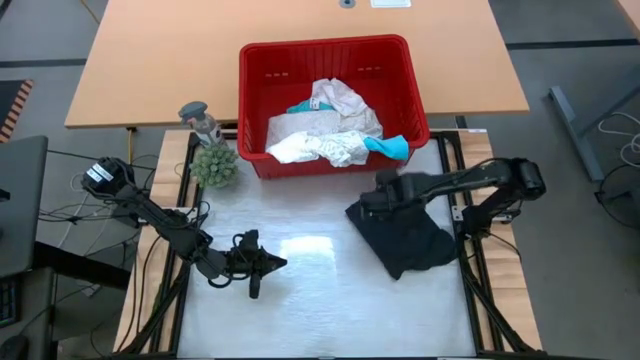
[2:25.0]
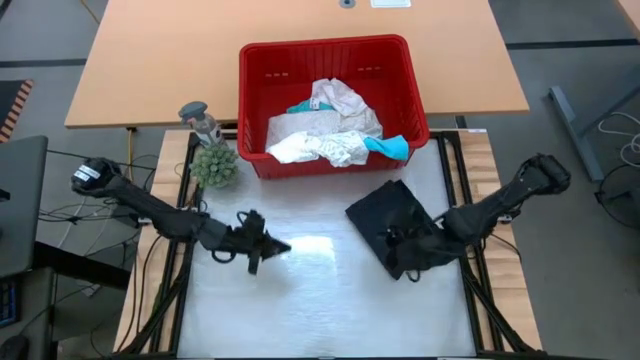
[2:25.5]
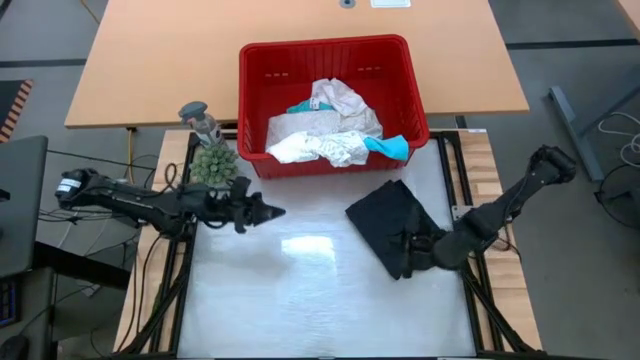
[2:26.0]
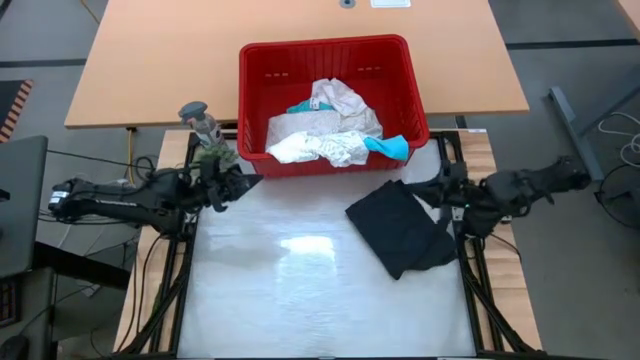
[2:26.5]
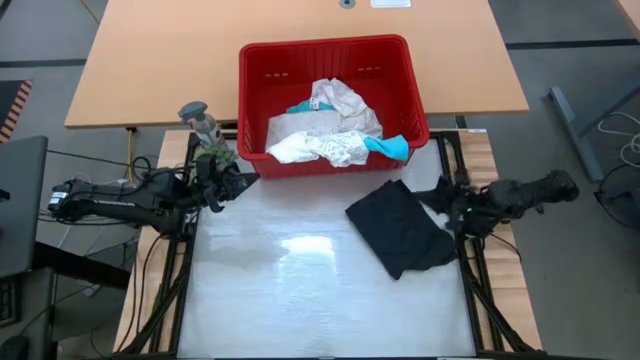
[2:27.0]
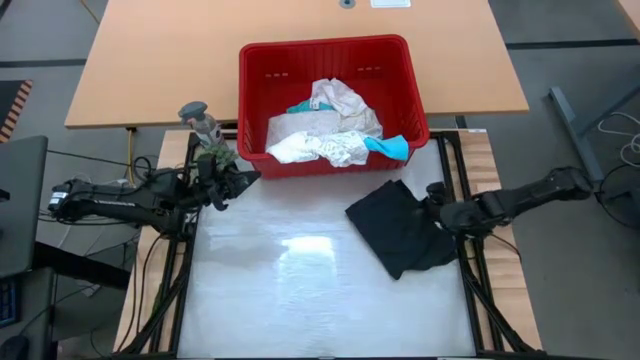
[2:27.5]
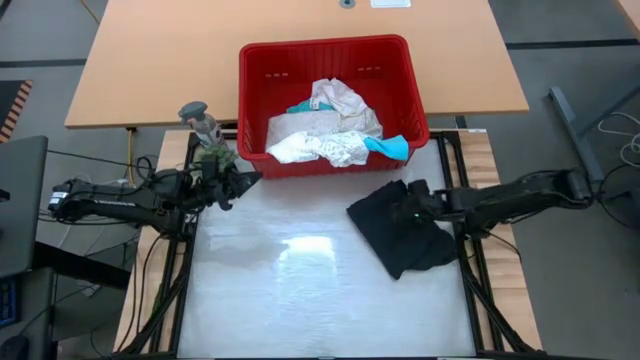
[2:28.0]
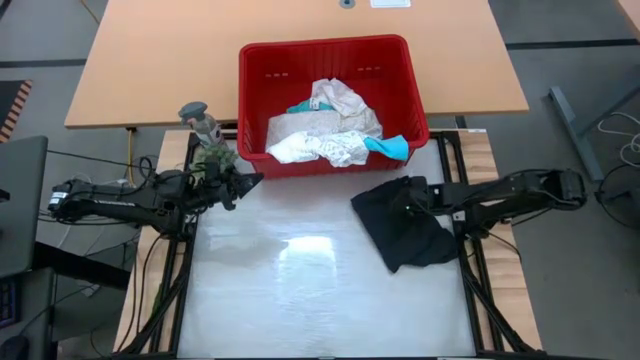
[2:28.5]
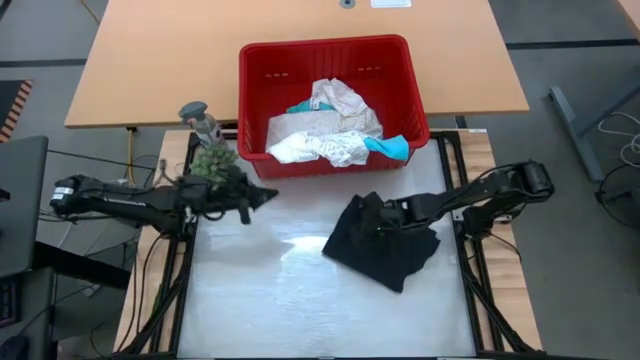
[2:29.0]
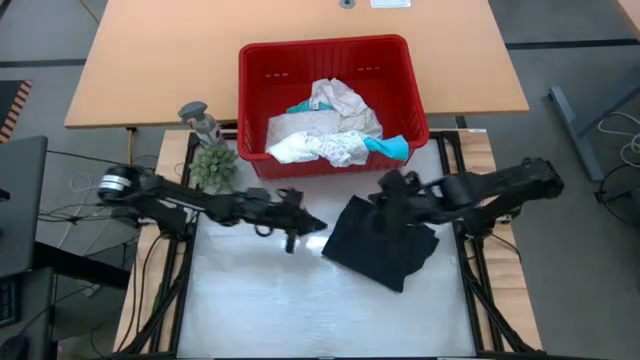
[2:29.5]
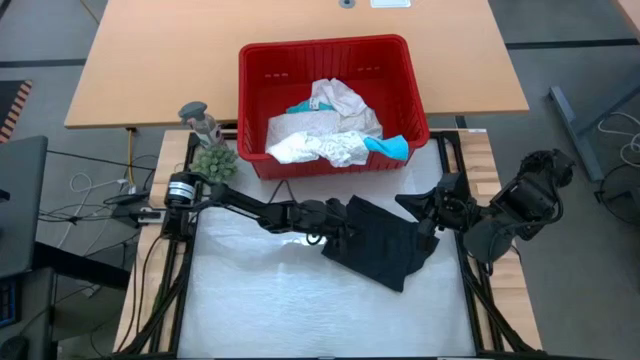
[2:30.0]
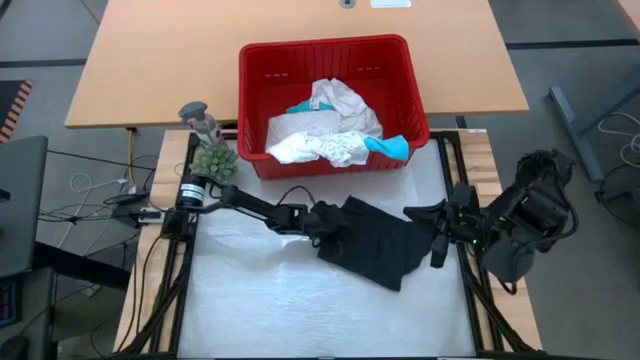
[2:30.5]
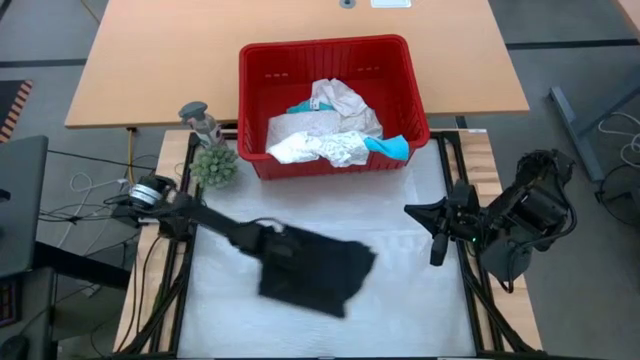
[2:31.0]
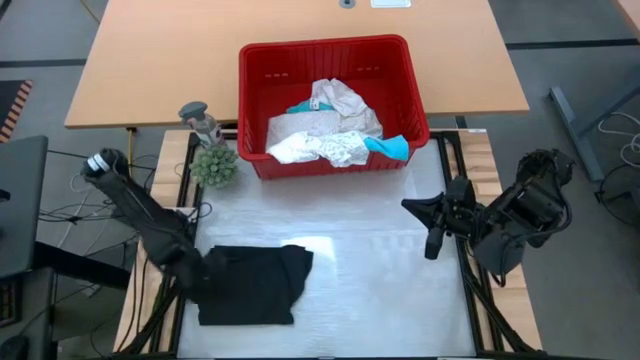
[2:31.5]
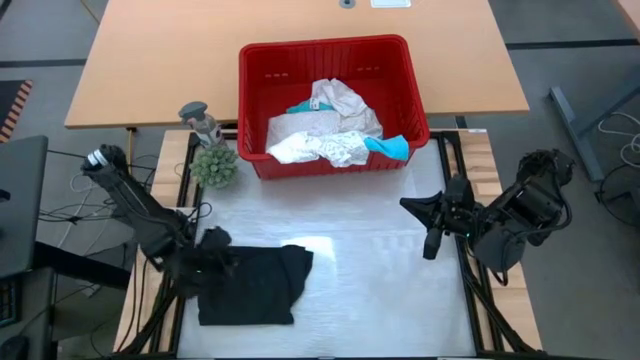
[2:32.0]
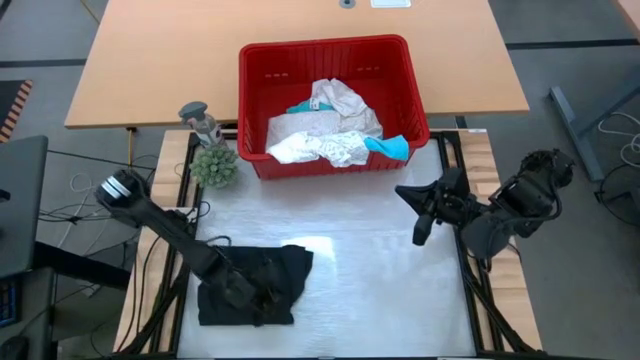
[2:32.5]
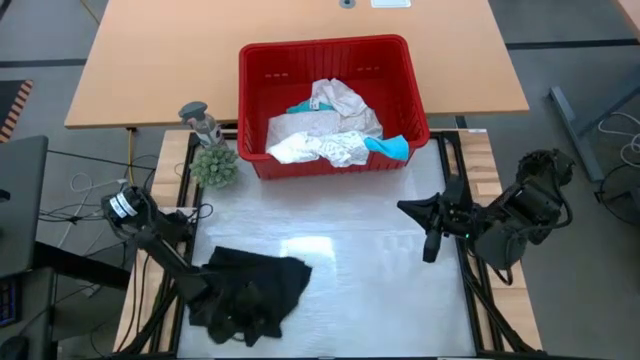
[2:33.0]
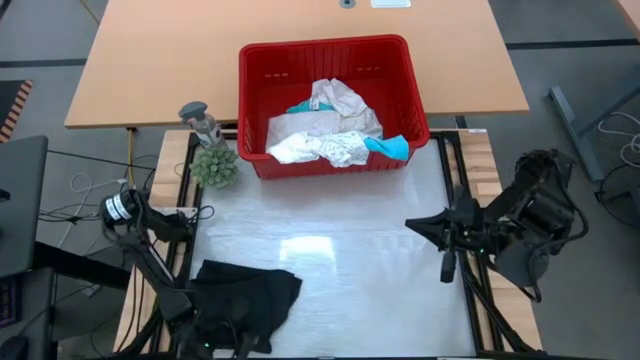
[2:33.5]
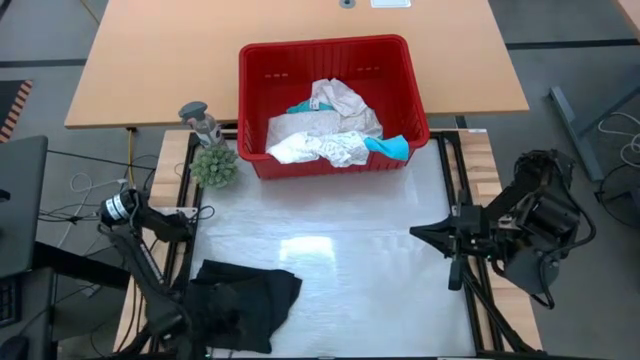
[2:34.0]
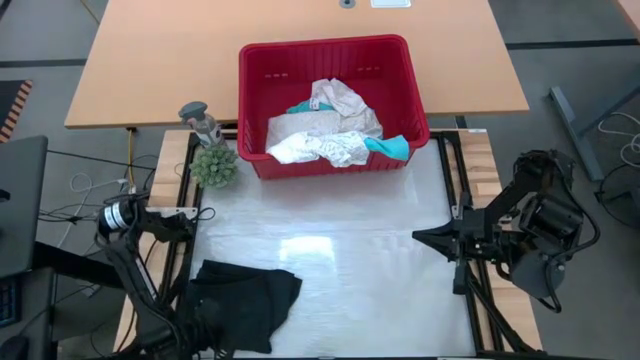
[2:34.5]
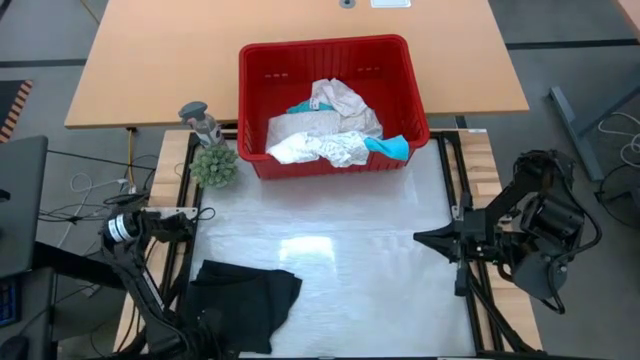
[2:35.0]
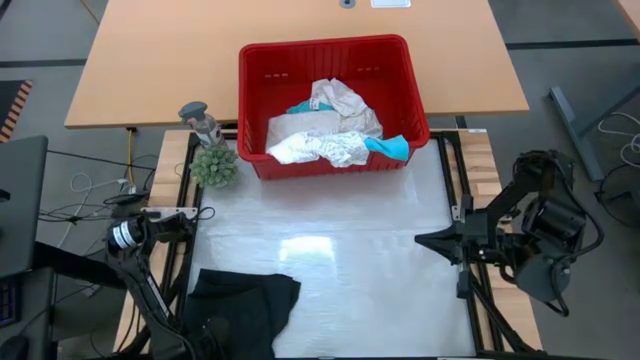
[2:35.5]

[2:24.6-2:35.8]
Task: Fold Laundry from Bin
Move the black shorts to the bottom left of the table

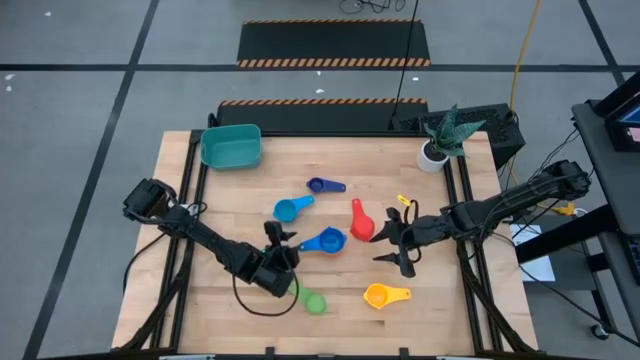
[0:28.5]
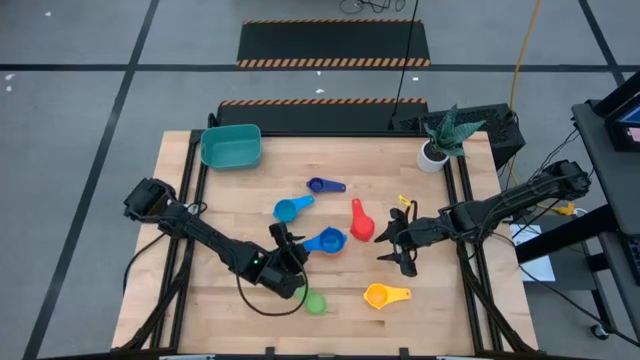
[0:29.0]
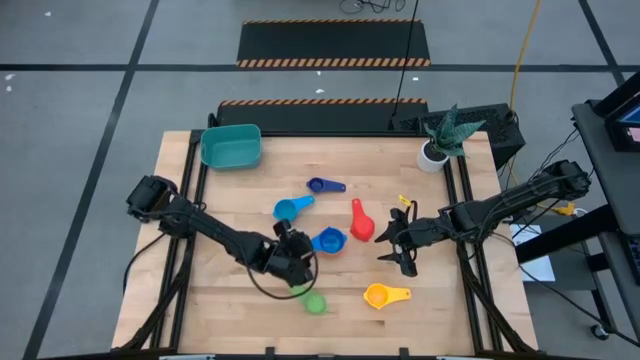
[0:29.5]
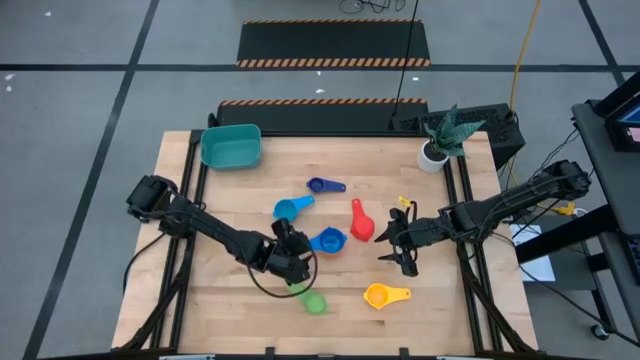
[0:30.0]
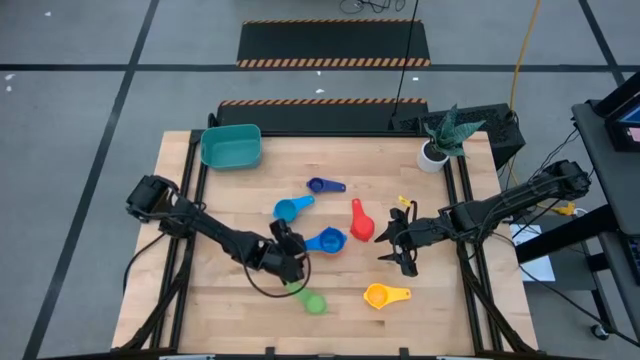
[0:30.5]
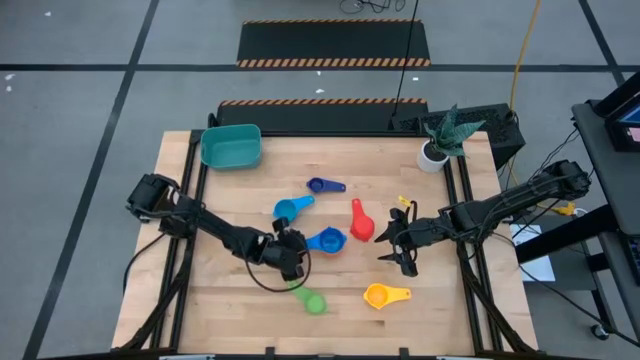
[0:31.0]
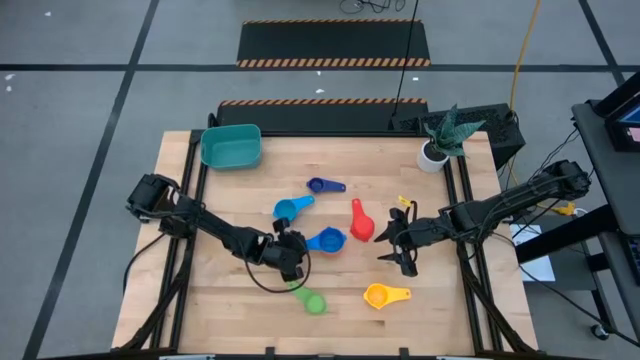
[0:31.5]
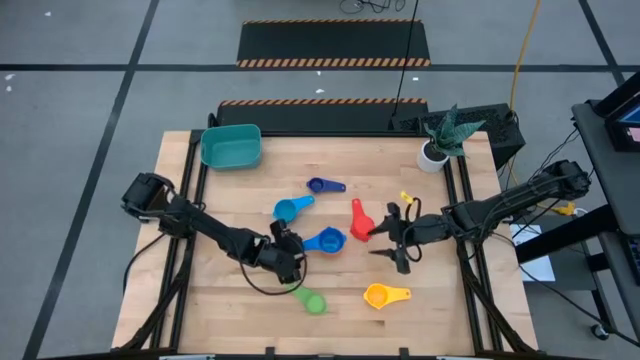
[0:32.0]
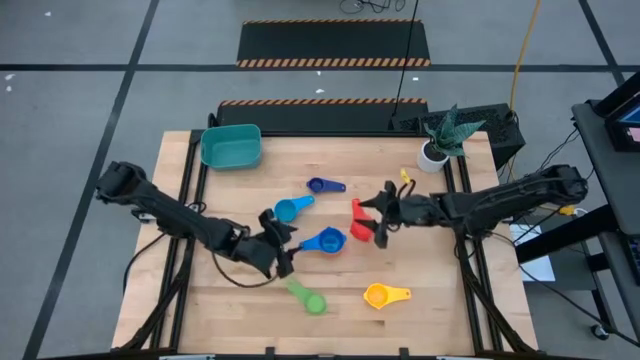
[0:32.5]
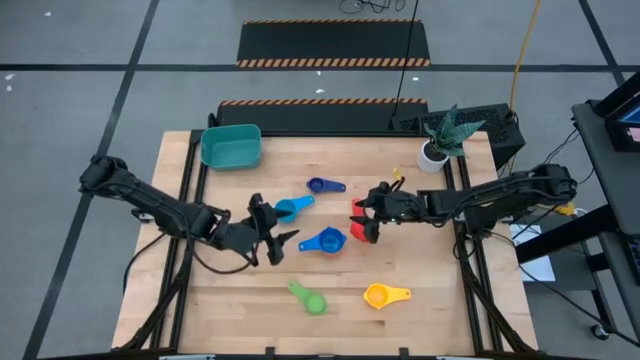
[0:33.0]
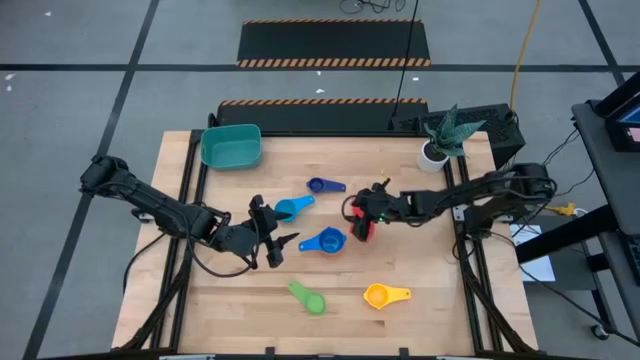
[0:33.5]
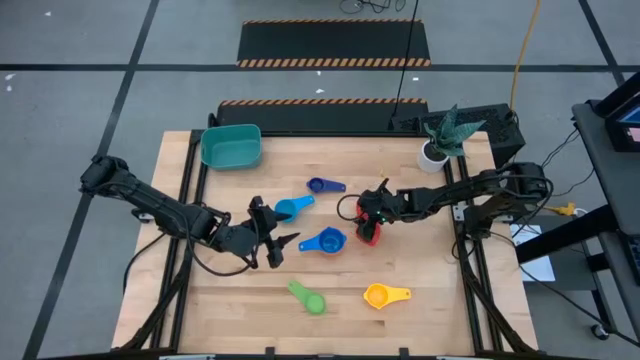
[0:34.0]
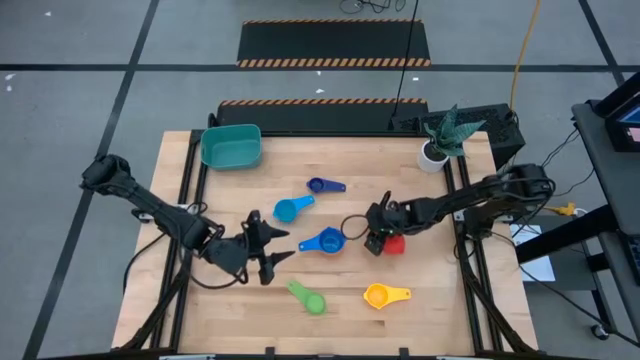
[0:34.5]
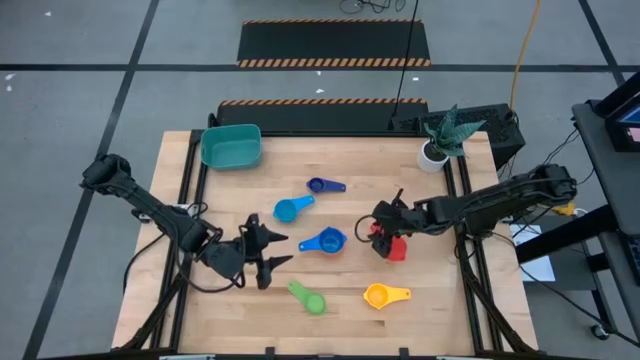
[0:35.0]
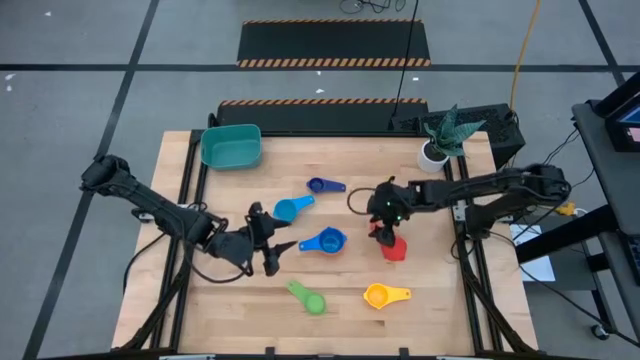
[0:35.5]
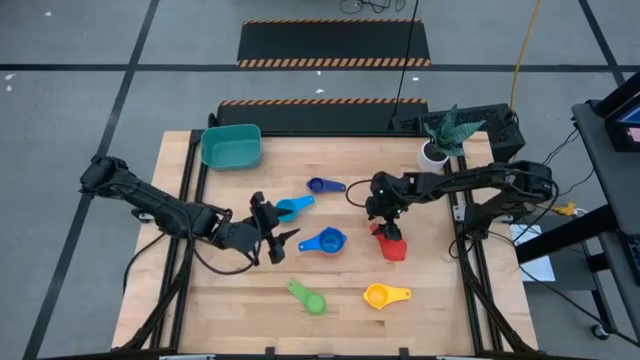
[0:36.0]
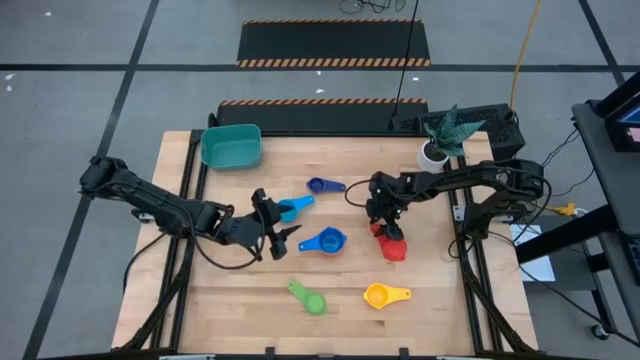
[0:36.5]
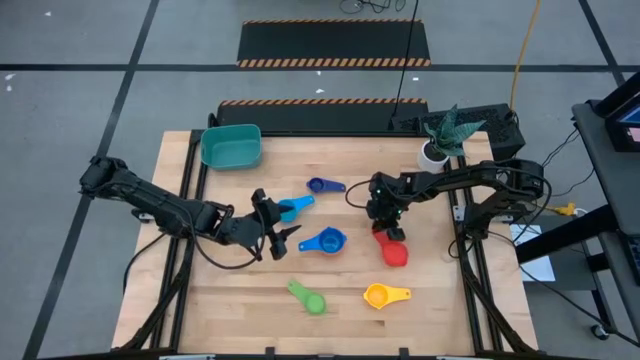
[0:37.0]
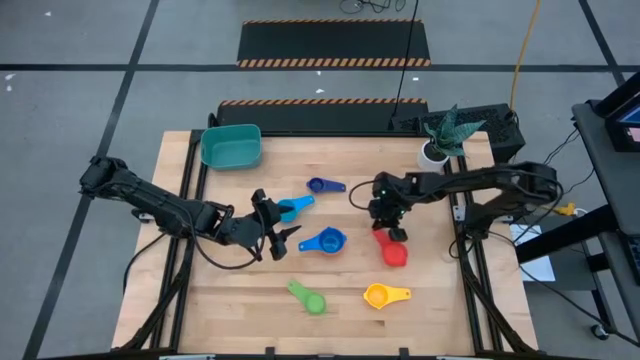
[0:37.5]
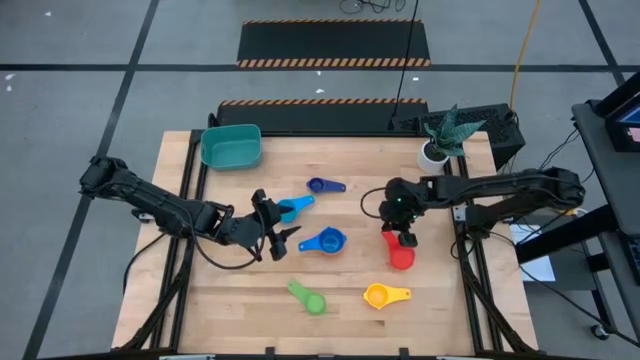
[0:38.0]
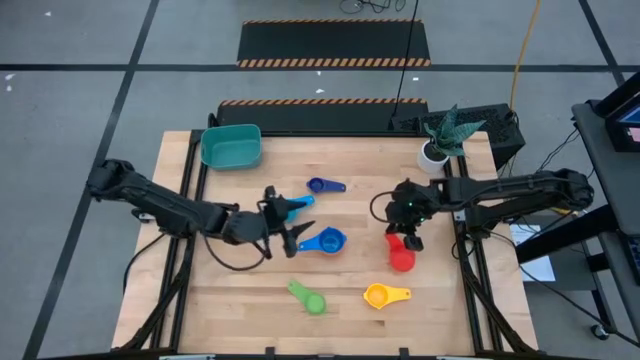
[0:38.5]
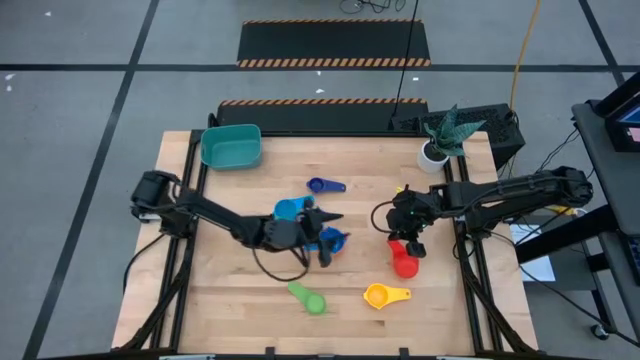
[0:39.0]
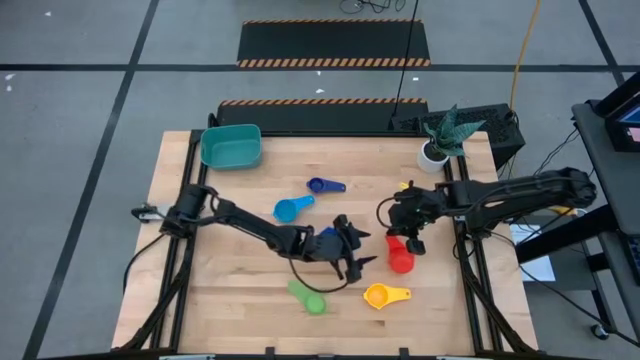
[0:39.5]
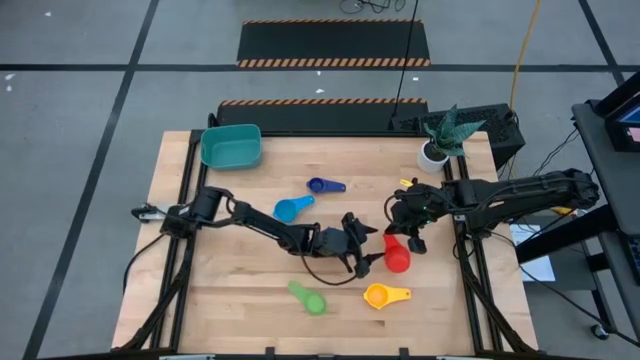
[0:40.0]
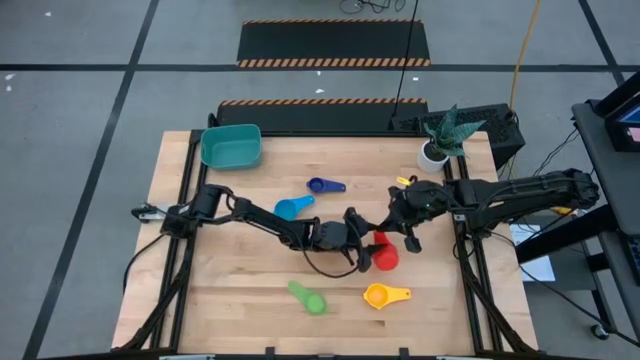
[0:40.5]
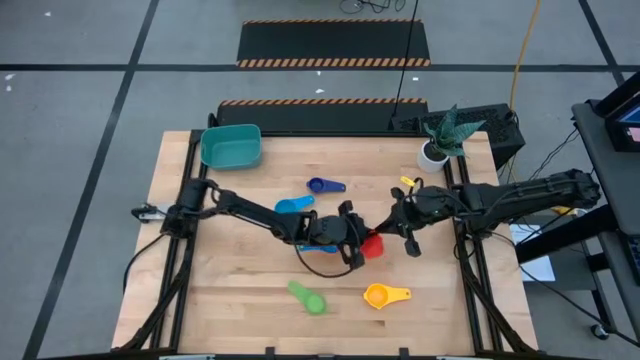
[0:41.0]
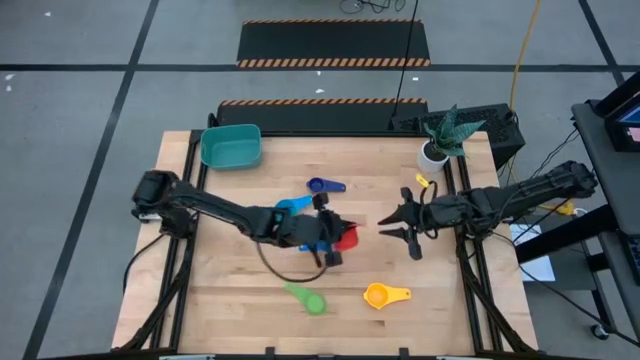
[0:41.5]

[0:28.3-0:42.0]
Task: Nest measuring cups in basket
Stack the red measuring cup on top of the light blue measuring cup
